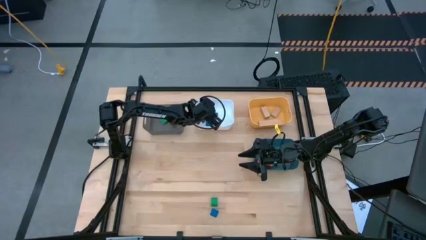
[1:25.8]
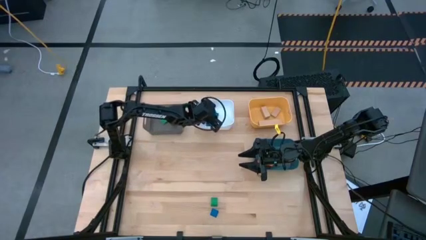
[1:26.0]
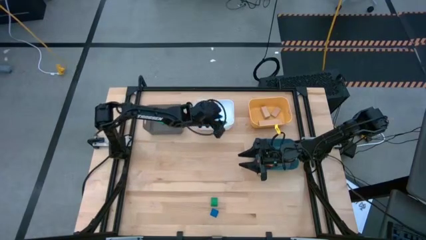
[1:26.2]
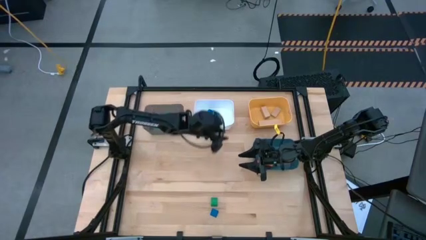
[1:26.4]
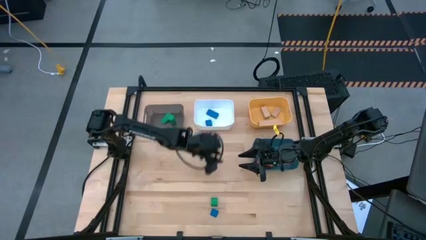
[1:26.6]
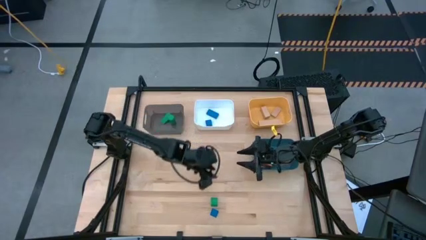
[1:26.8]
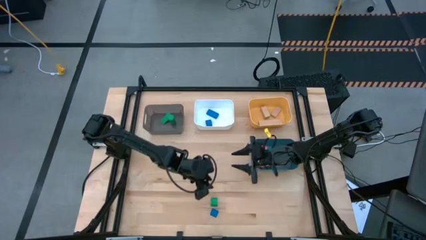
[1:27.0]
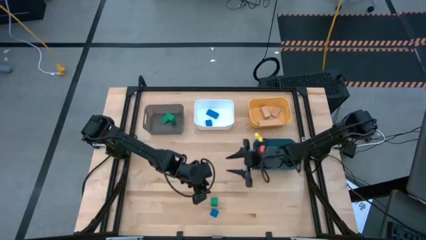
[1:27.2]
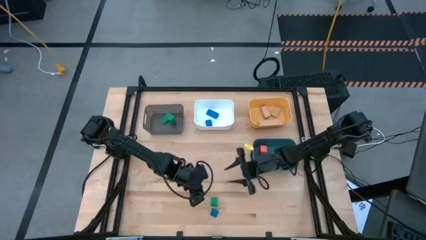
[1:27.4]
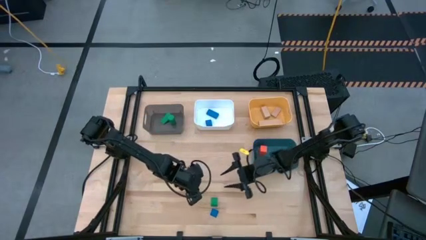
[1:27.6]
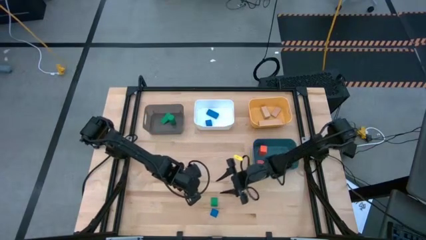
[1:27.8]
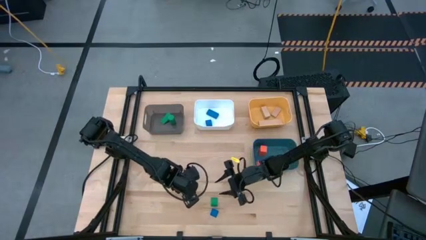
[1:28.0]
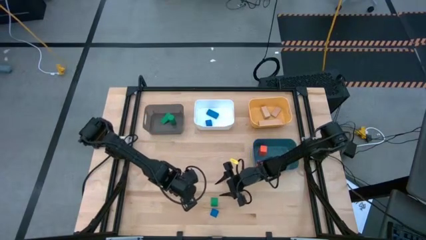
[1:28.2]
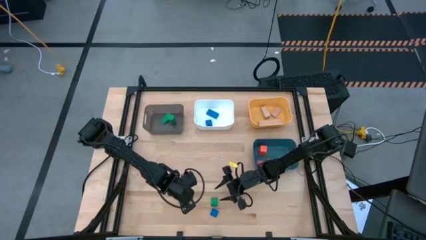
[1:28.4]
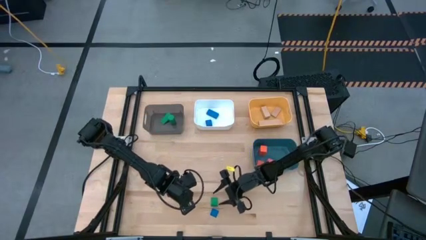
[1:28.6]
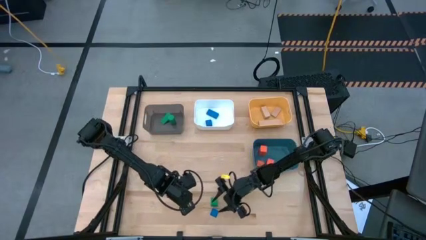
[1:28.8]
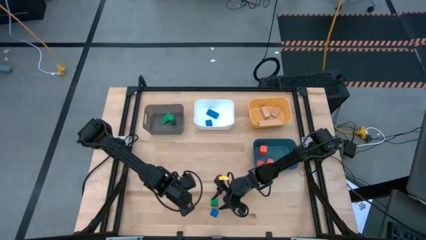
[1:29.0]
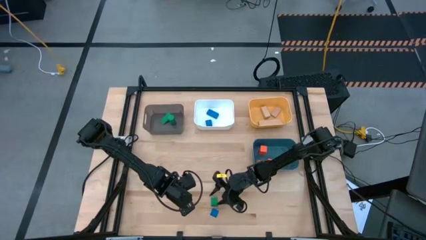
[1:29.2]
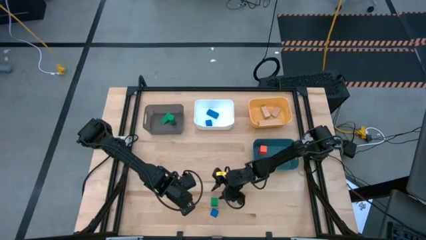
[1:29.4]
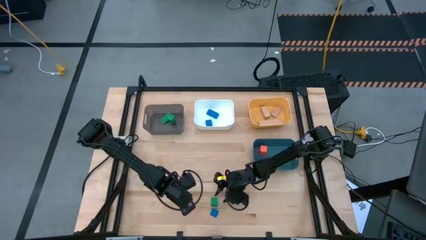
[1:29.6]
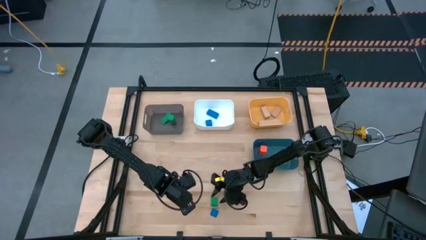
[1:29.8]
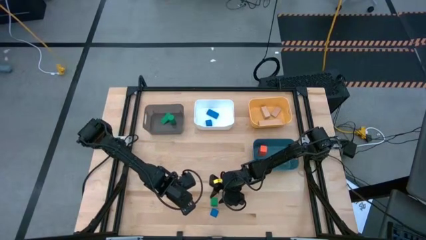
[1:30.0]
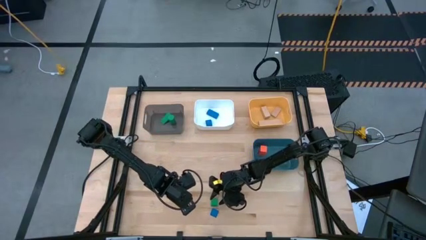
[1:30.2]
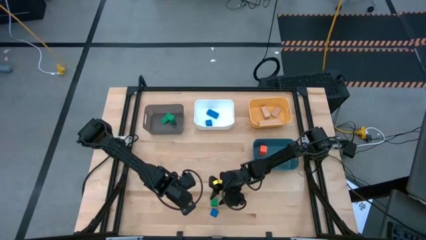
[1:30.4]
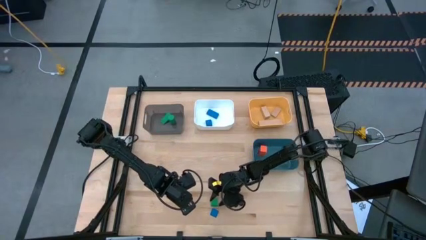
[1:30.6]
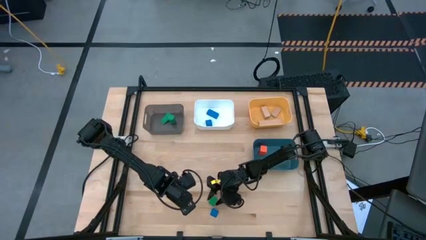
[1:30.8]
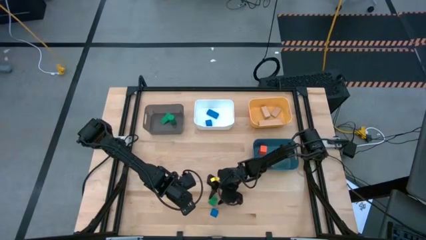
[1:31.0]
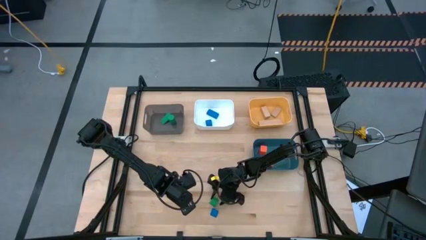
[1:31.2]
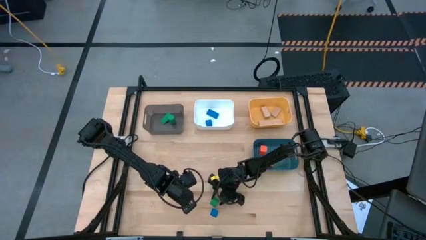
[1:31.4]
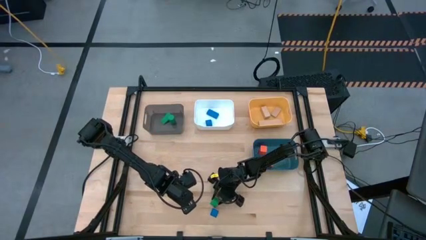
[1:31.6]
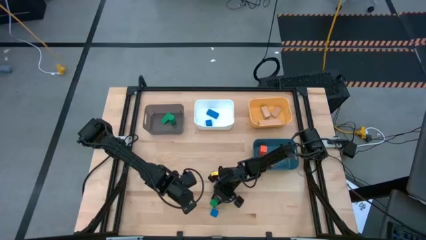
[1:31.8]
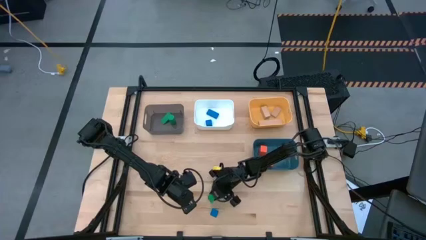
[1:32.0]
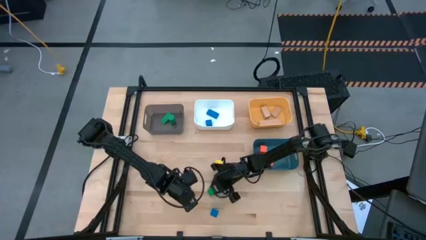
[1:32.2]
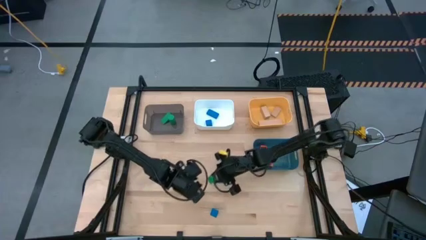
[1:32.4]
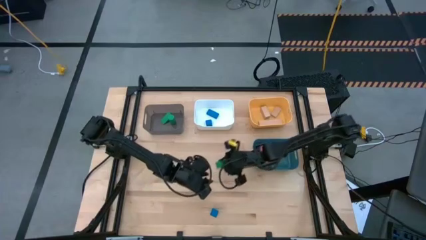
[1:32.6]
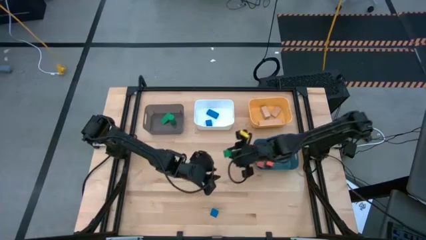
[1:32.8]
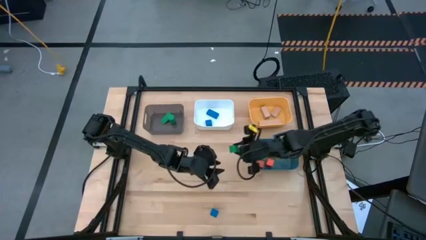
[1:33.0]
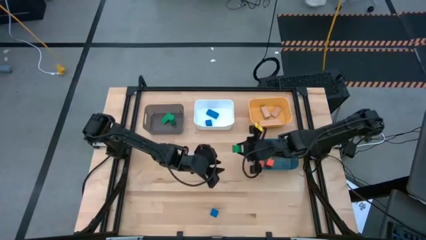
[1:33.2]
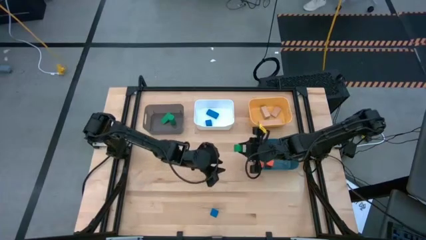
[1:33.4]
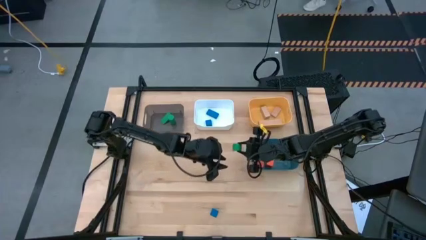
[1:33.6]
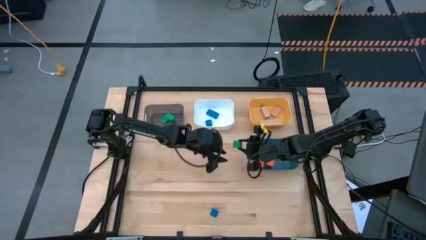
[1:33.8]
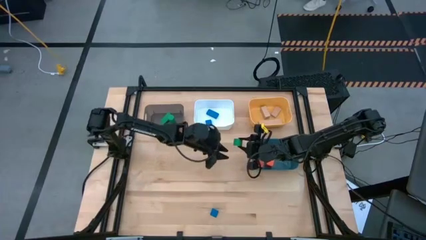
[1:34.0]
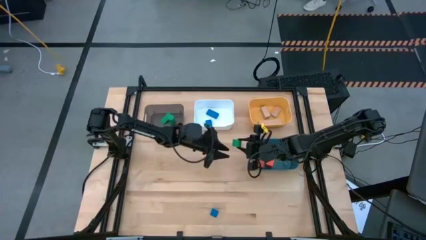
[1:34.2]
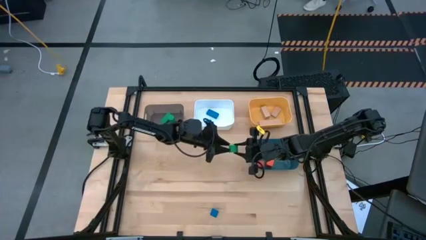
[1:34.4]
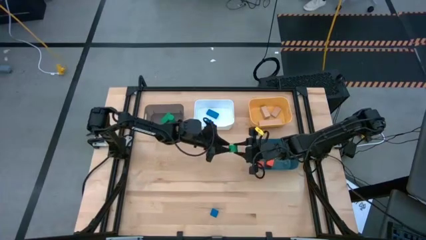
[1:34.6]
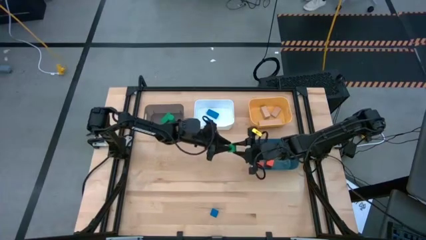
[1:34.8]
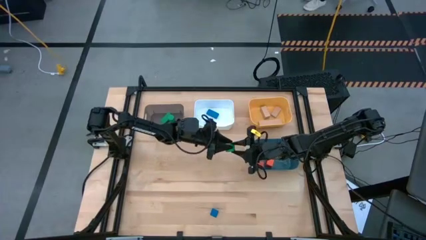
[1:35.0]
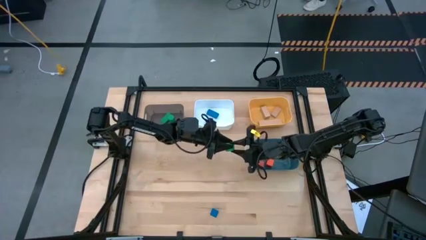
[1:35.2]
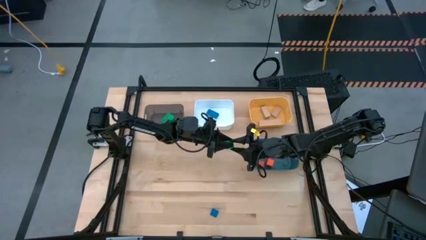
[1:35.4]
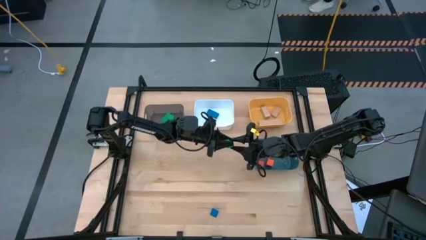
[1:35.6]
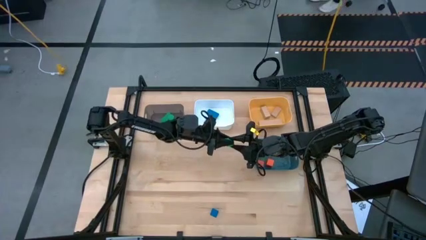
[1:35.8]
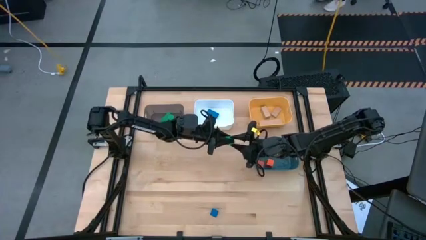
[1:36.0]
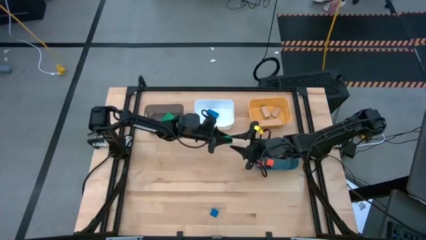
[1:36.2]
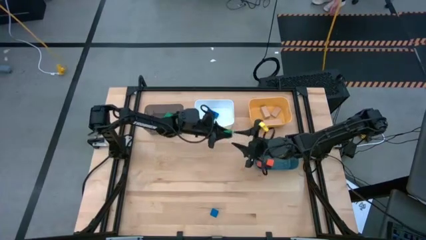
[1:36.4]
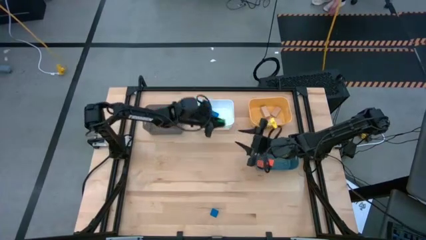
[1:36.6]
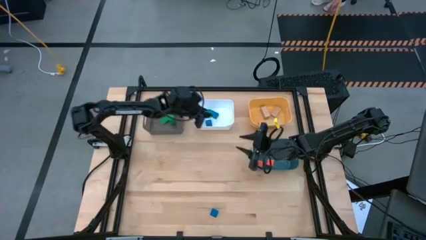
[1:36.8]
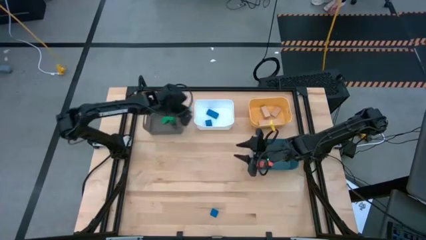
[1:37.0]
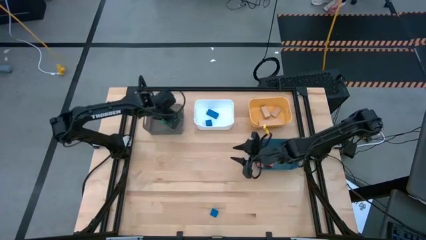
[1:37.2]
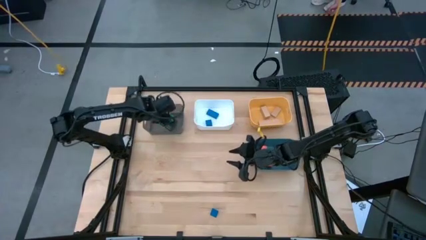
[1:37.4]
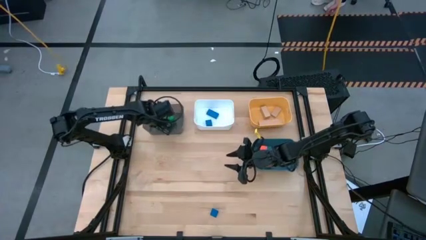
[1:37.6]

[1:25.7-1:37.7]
Task: Sort & place blocks by color
Put the green block into the black bin

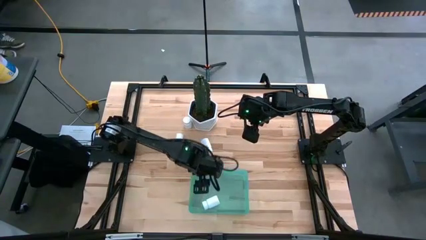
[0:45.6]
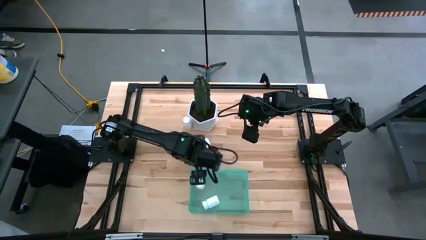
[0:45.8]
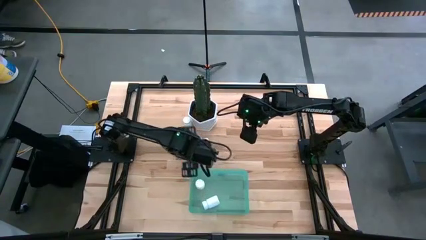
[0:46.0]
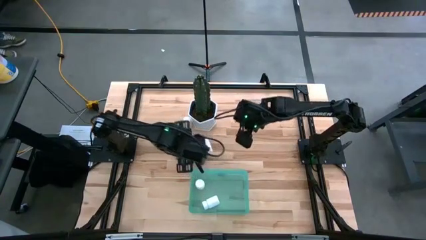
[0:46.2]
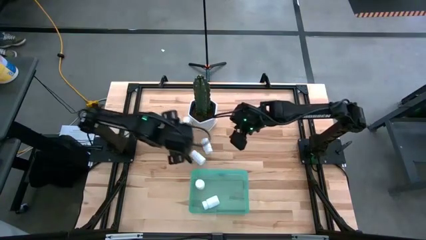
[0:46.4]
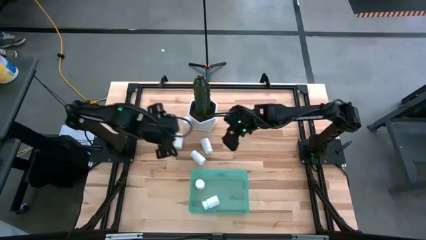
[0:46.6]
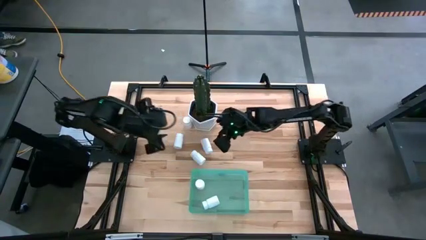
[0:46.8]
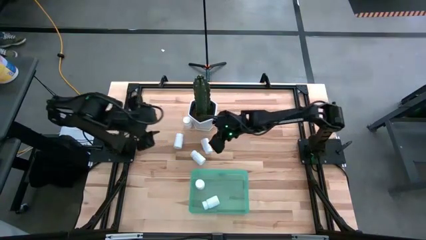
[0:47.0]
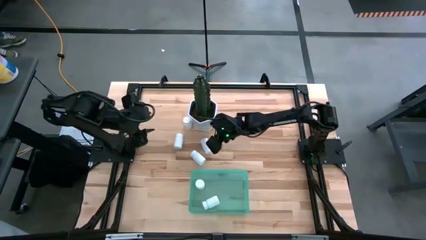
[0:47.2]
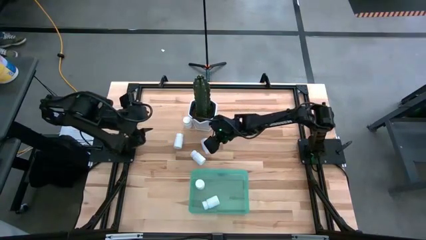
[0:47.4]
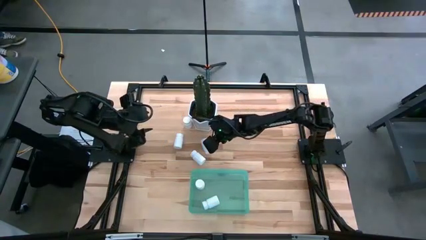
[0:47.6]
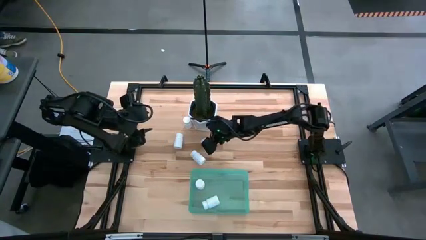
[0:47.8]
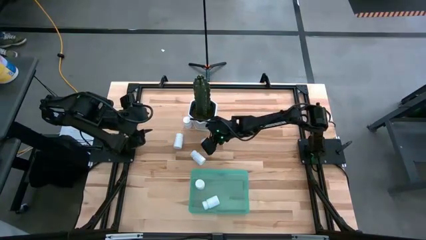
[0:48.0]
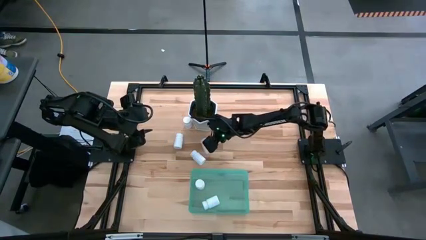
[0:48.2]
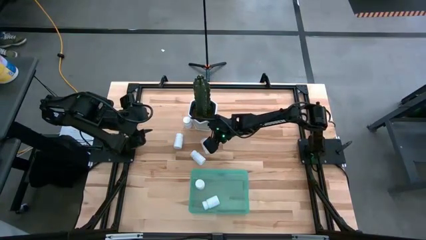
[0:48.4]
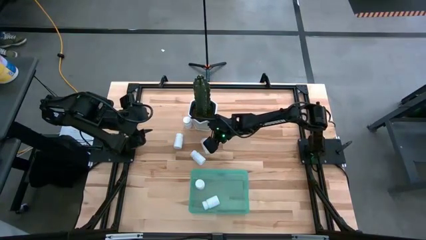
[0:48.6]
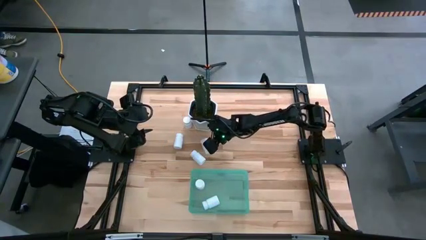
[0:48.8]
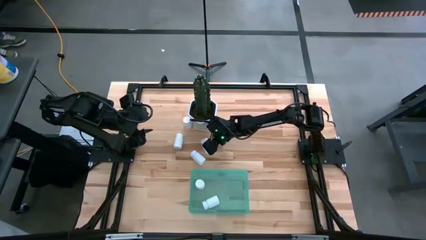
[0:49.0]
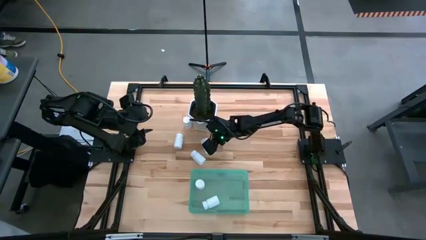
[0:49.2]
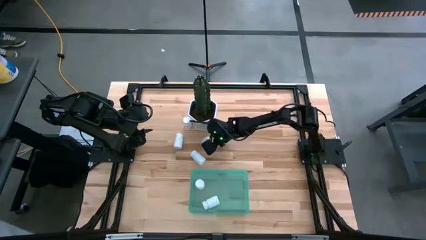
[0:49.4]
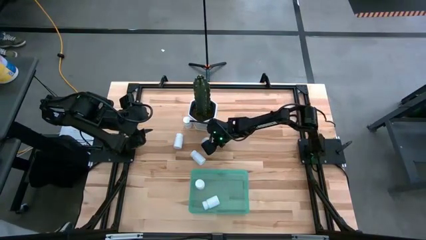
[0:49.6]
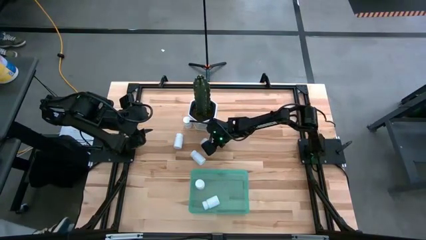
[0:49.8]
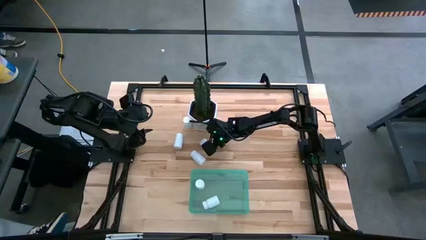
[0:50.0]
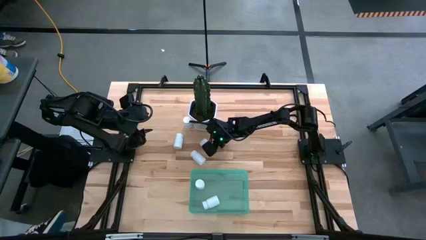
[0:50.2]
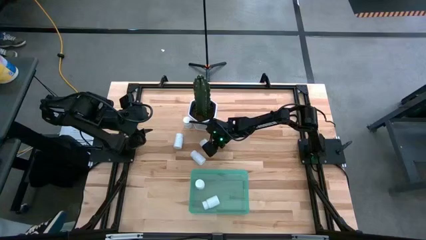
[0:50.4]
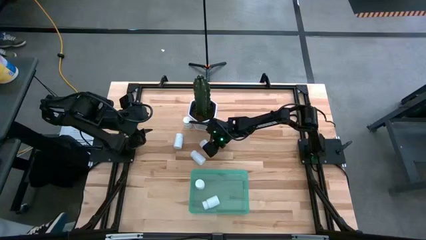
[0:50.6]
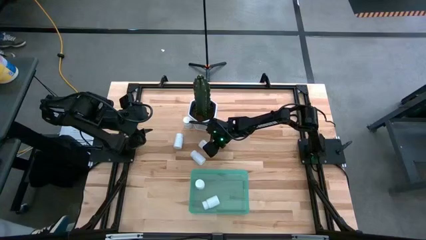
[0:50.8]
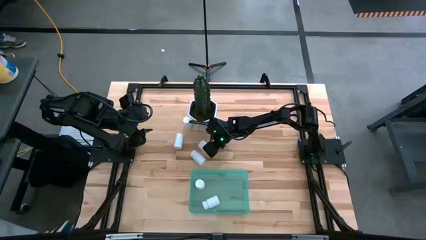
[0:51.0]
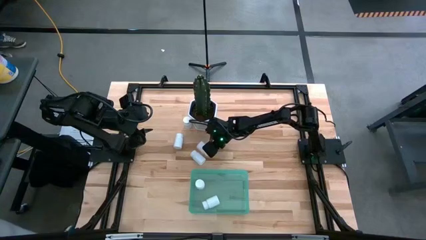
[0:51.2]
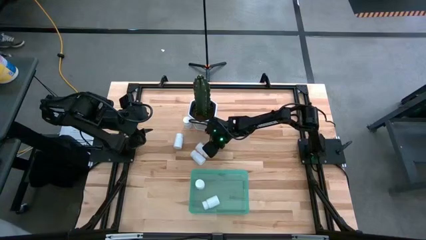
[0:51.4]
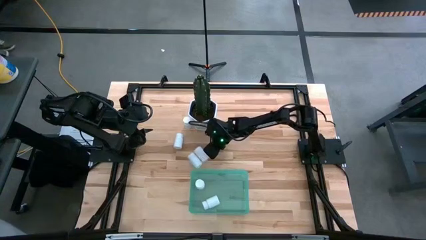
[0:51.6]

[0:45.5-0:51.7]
Task: Pick and place pill bottles into a basket
Put the white pill bottle into the green bin
